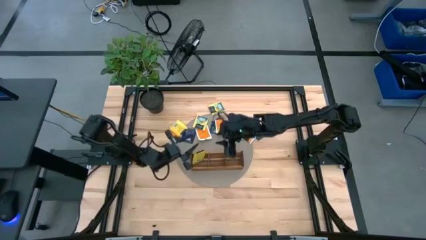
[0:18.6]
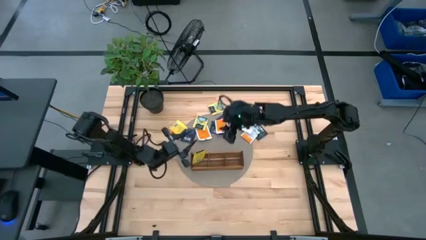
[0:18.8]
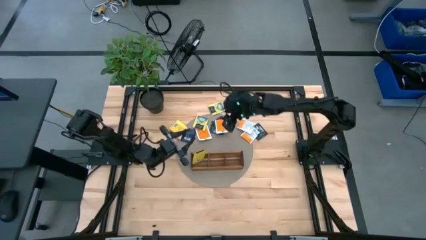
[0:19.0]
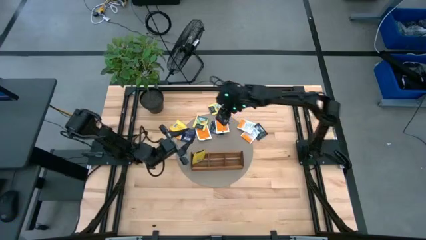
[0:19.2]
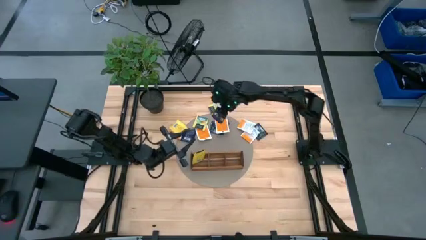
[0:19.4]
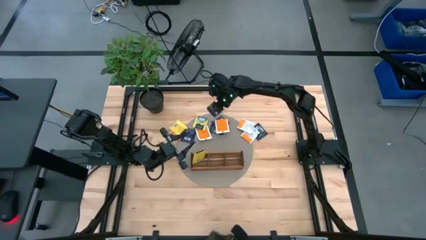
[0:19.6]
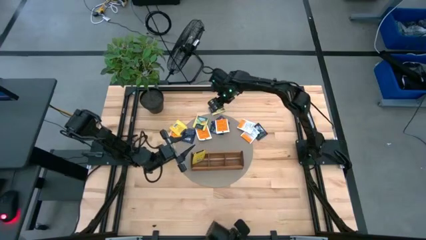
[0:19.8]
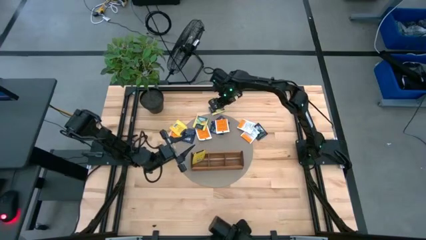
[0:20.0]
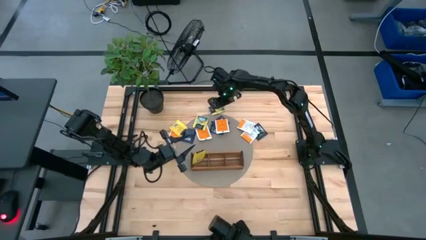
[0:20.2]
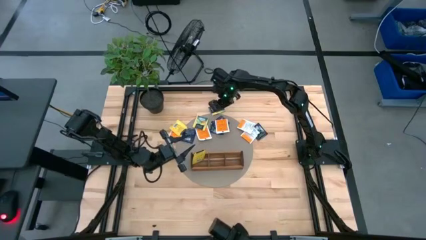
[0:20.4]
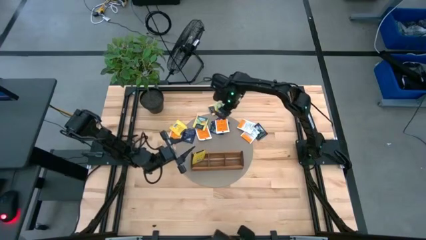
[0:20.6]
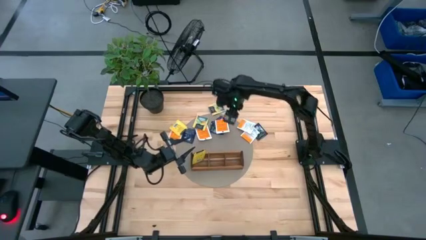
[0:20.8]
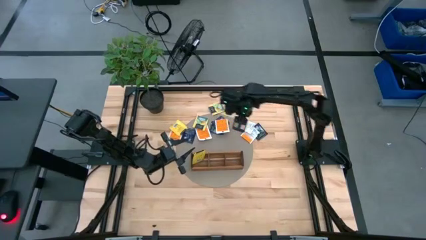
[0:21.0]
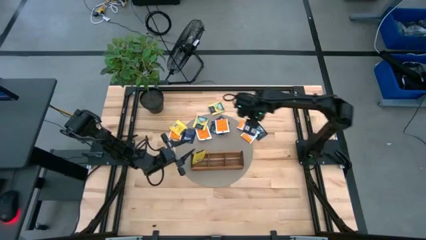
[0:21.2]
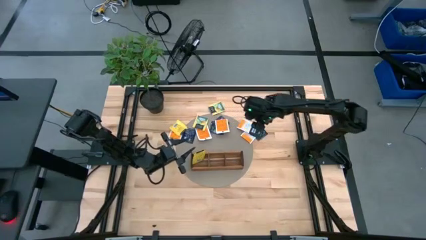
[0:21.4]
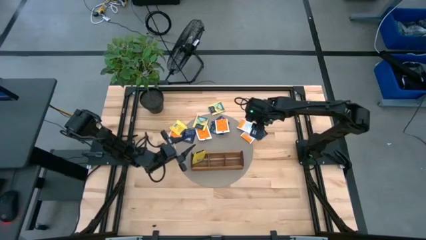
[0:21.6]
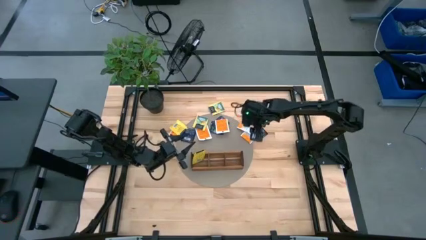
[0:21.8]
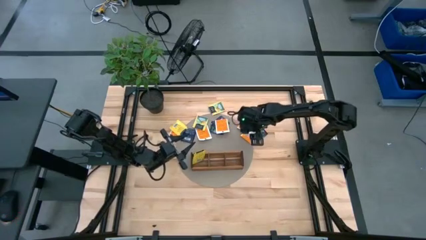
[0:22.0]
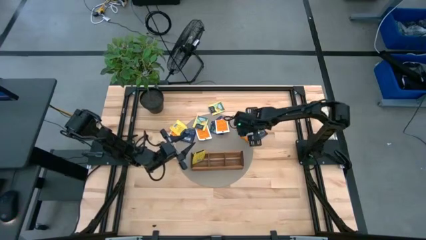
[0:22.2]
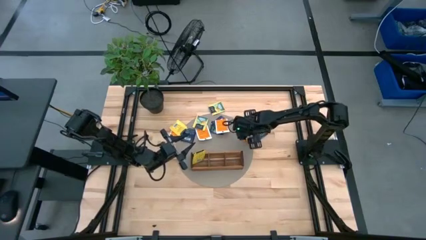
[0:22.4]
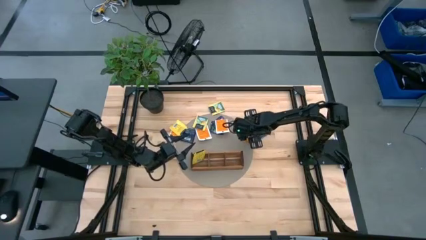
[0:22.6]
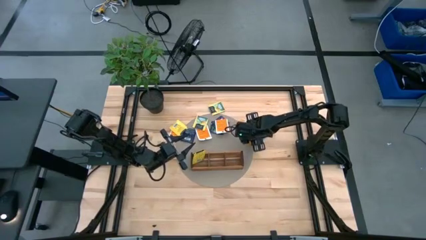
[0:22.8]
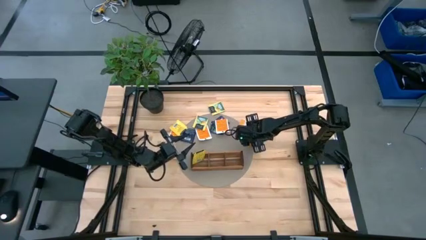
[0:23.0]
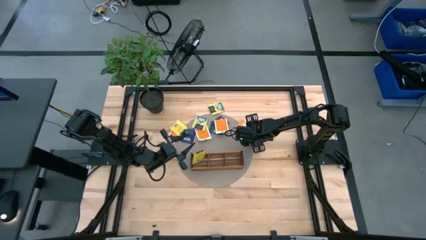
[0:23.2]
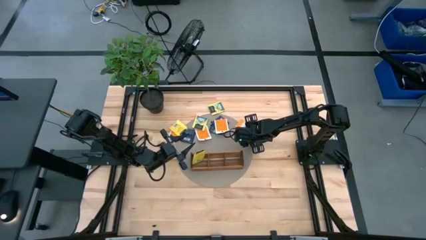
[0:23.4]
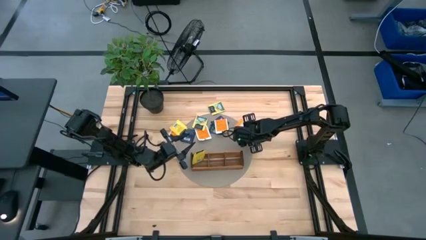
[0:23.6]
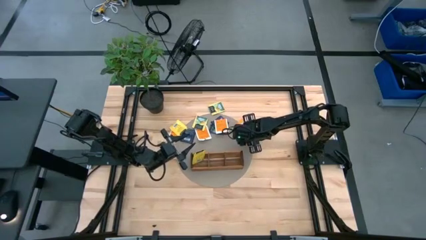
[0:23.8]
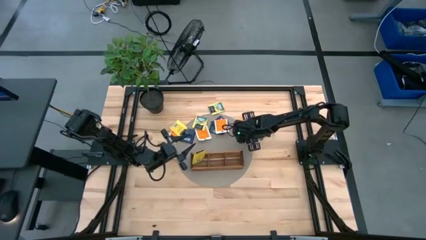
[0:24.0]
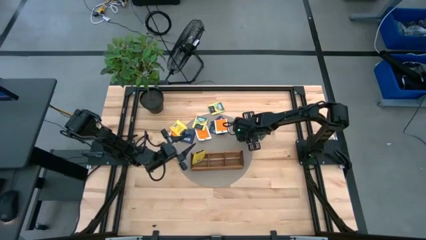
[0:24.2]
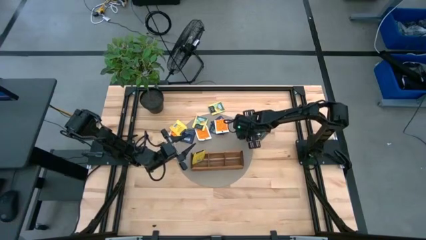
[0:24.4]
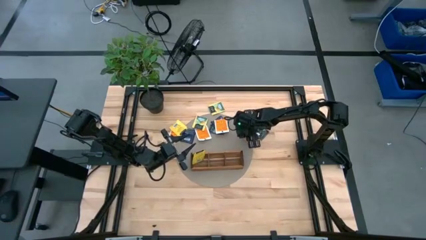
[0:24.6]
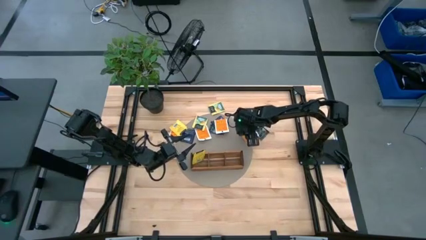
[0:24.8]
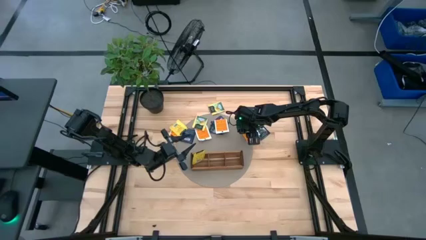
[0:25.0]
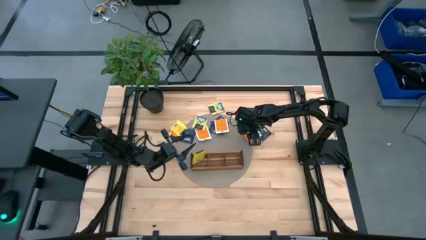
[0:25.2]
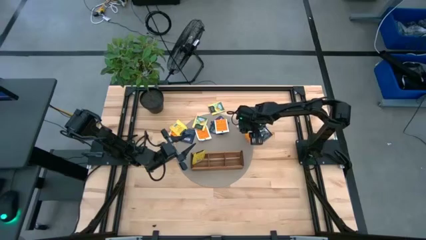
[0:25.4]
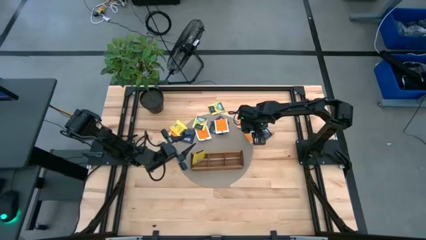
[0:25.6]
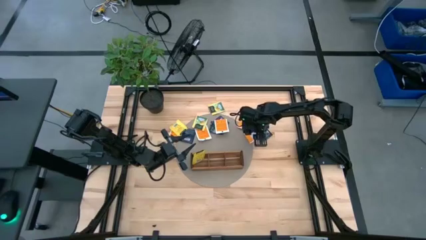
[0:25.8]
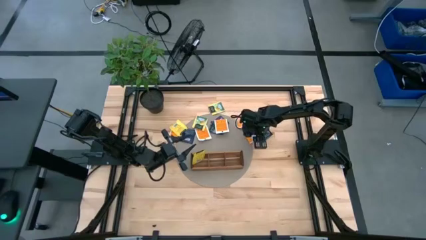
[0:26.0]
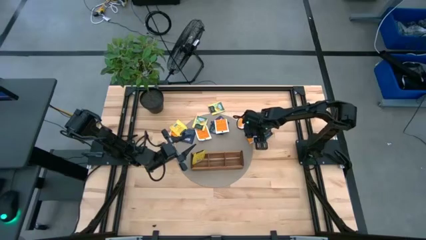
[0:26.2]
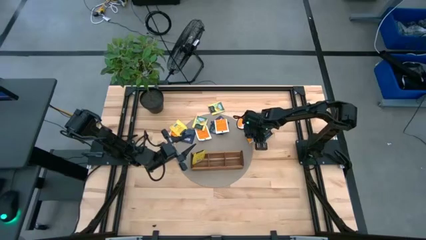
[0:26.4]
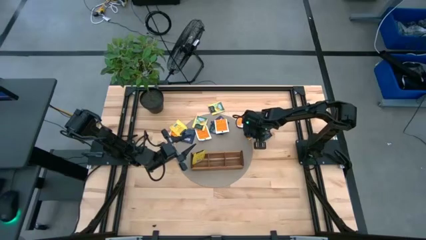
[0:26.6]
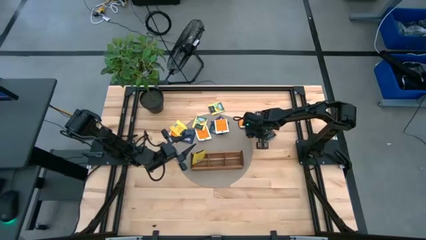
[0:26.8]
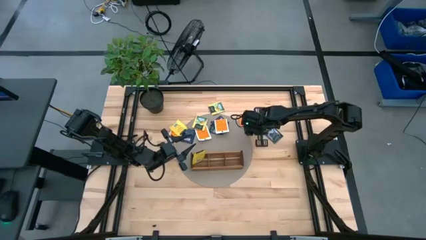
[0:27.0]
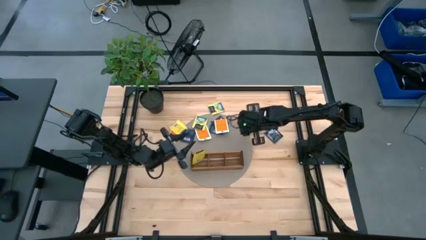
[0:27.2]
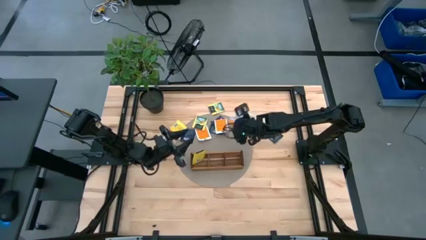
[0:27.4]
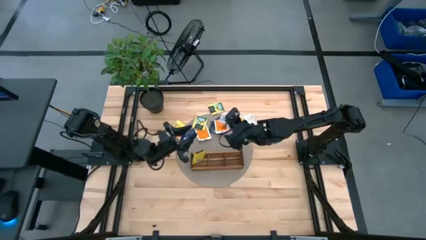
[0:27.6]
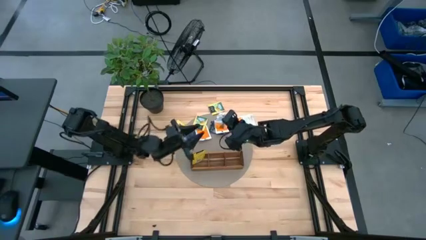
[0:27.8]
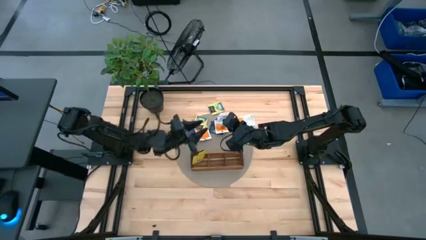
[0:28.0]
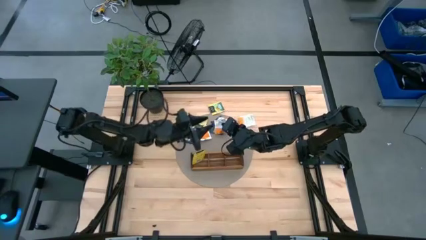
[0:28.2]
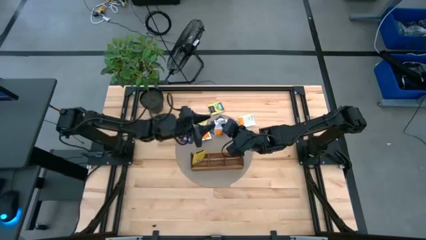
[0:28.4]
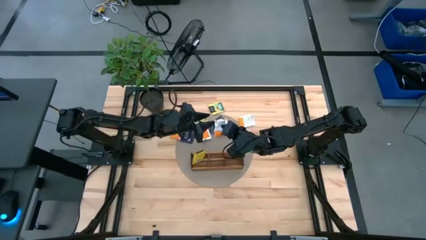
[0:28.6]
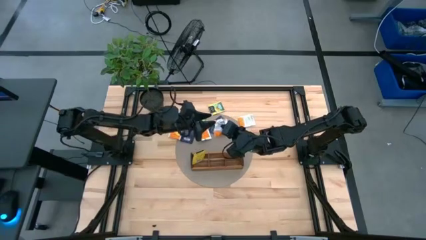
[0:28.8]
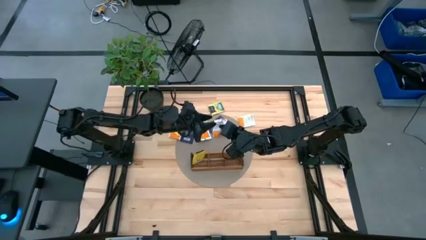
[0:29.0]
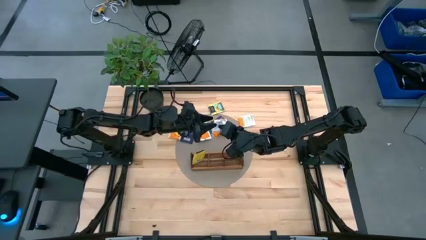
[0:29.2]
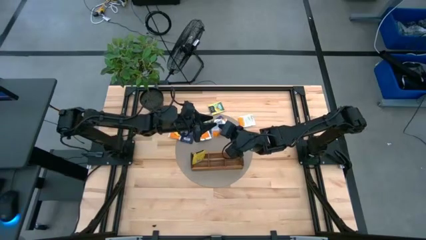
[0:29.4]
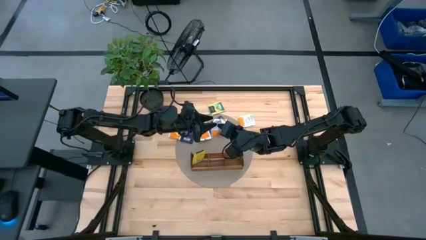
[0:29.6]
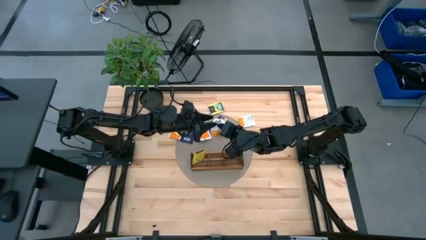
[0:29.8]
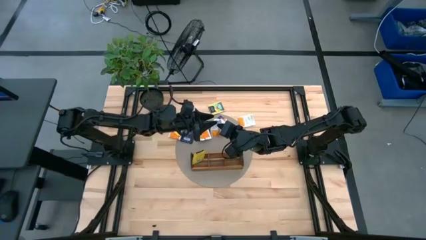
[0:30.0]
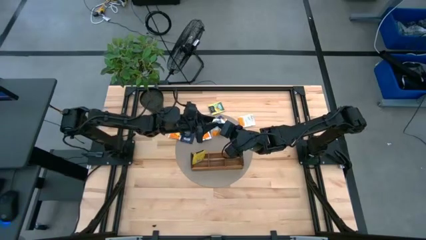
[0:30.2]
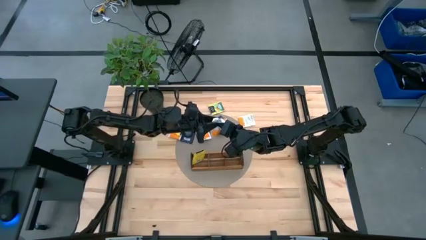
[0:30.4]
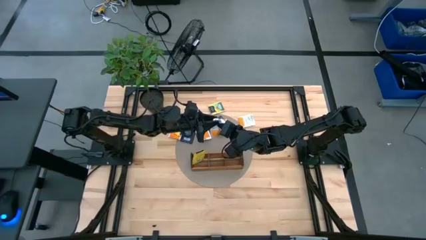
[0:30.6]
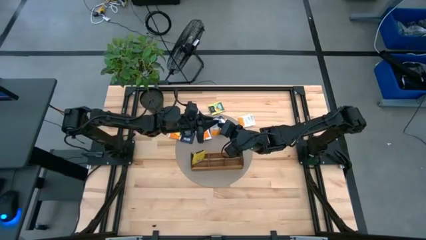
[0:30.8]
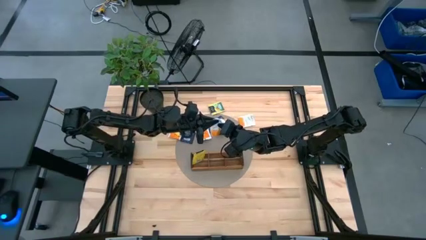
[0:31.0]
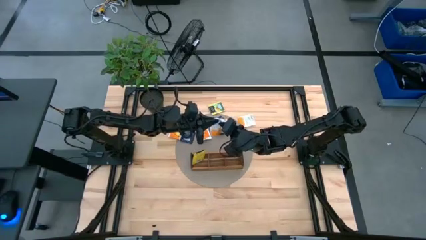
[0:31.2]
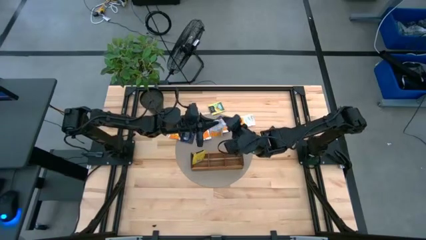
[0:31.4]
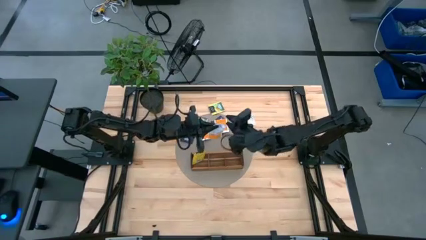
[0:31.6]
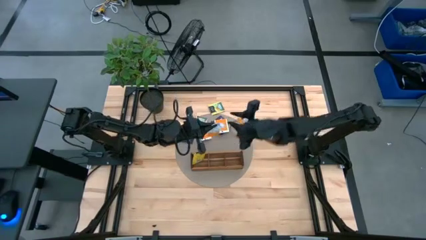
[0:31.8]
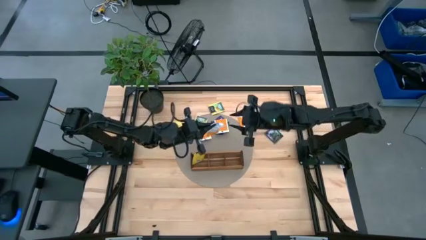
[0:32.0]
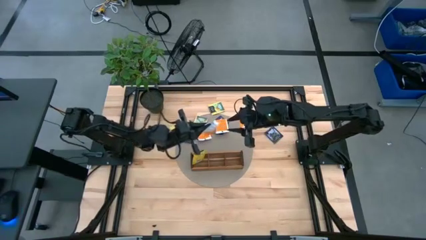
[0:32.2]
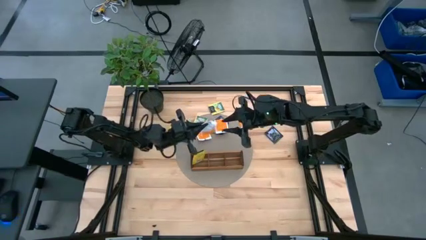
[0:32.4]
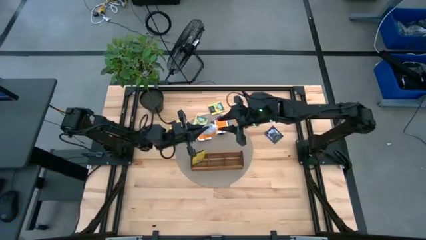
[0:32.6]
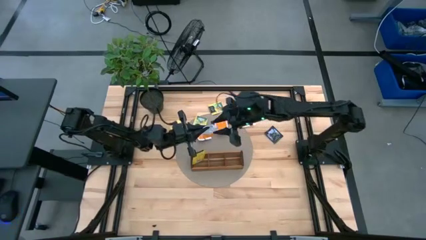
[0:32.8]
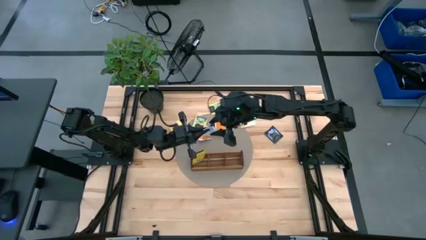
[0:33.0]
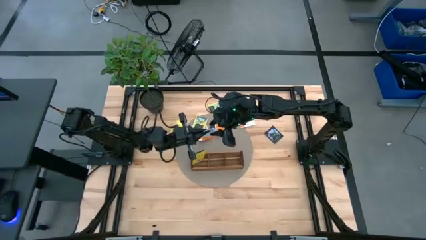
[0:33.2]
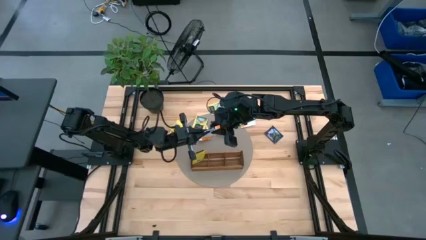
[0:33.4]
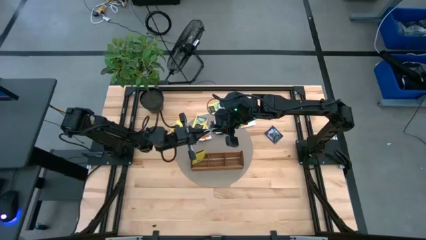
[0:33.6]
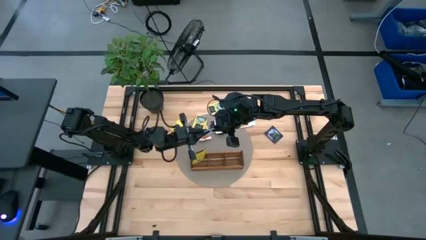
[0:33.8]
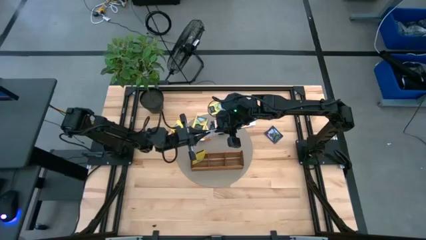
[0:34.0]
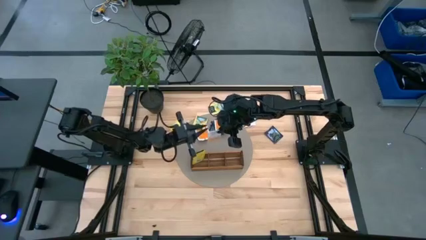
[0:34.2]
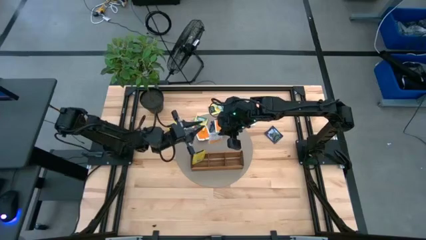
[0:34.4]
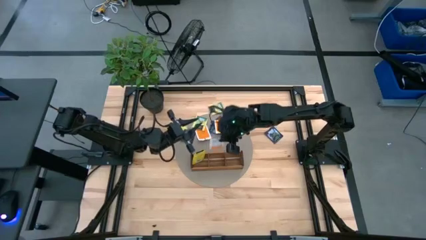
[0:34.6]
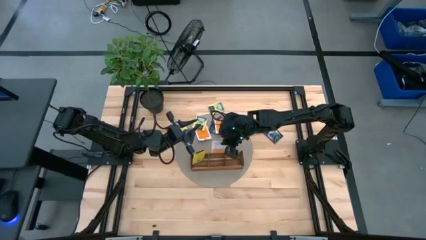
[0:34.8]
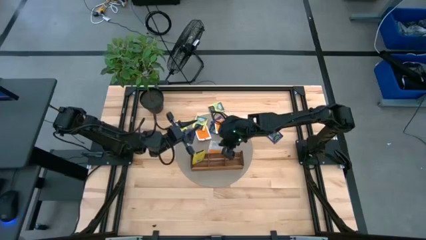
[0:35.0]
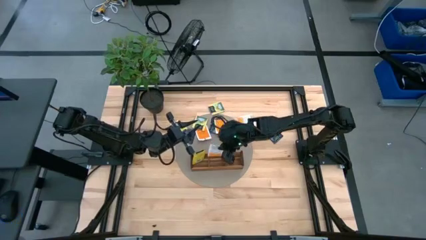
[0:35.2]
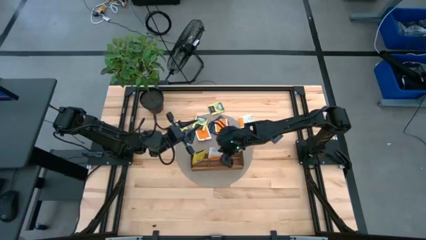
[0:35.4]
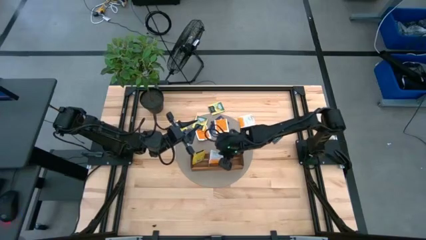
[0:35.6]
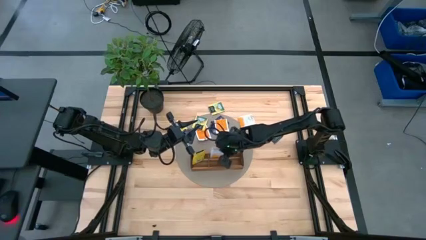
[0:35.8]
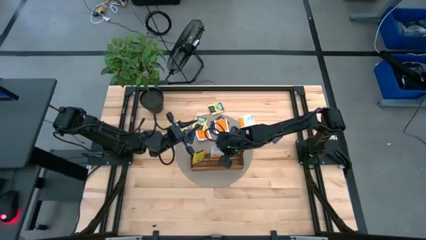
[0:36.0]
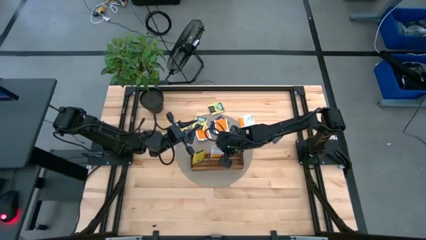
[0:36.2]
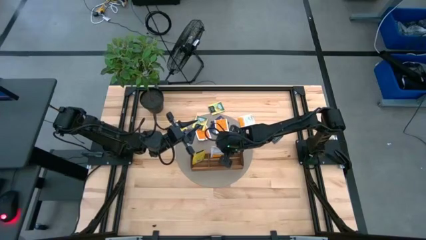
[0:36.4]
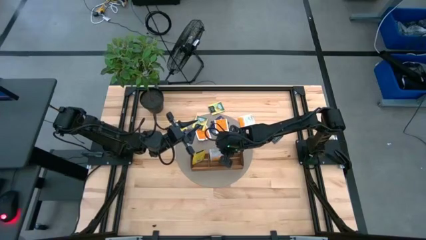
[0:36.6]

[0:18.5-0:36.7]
Task: Pick & Place Tea
Put the orange tea bag into the middle section of the wooden organizer
